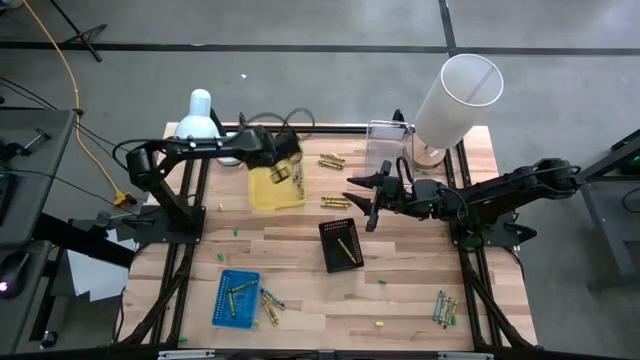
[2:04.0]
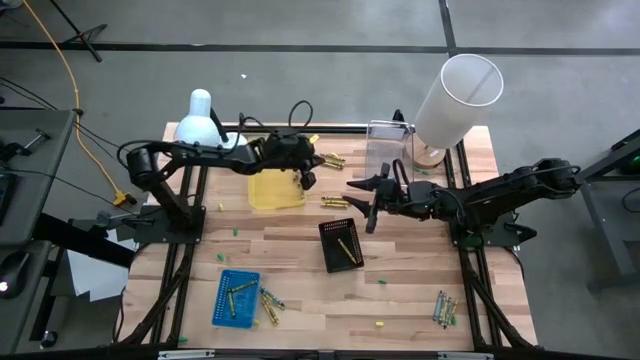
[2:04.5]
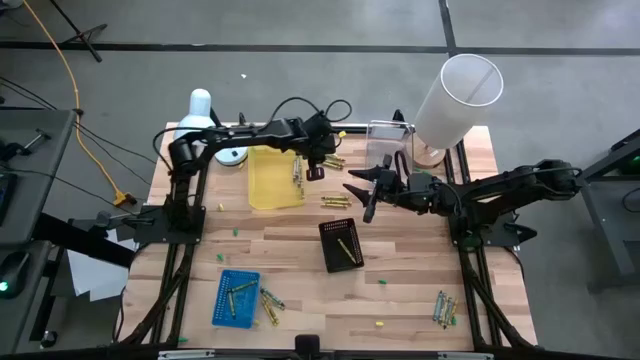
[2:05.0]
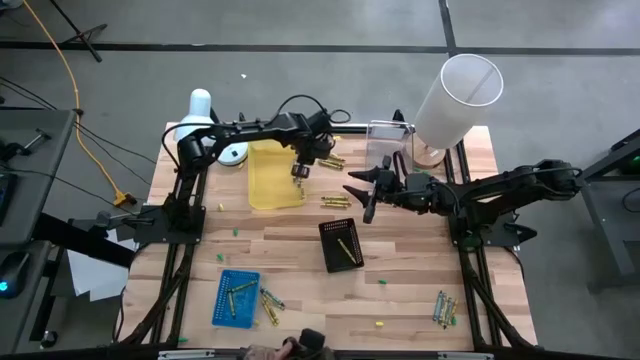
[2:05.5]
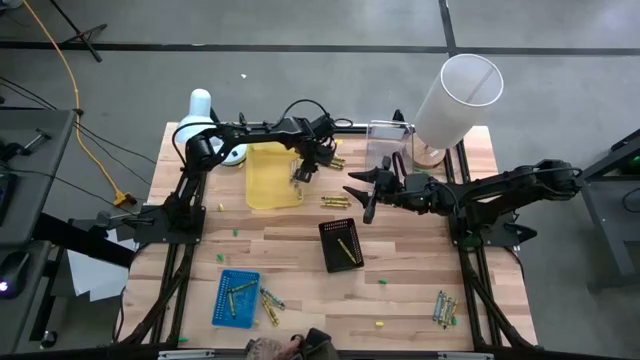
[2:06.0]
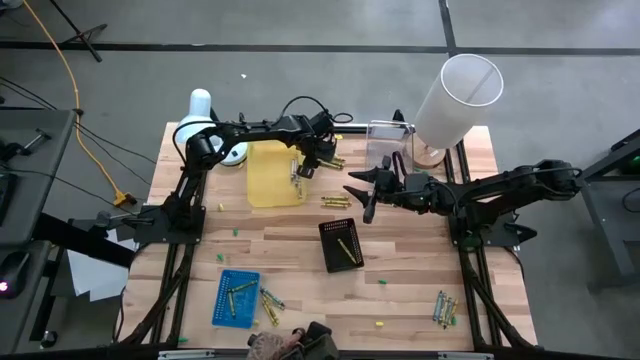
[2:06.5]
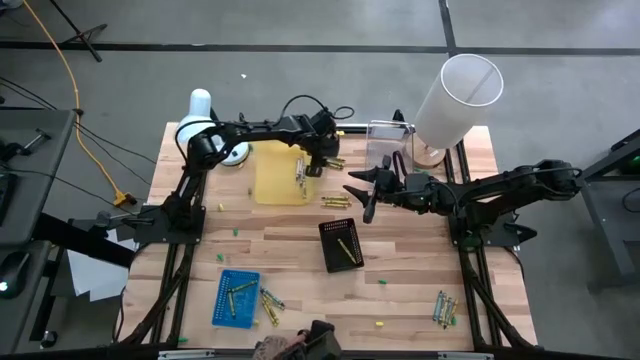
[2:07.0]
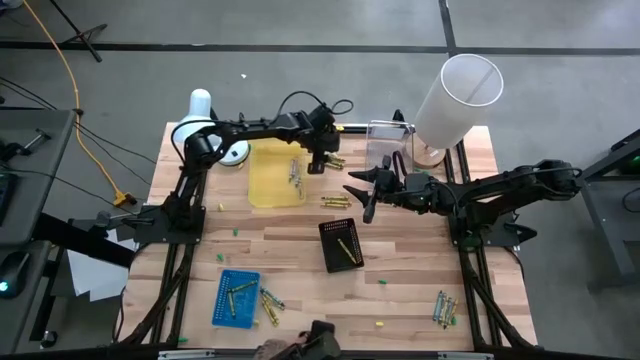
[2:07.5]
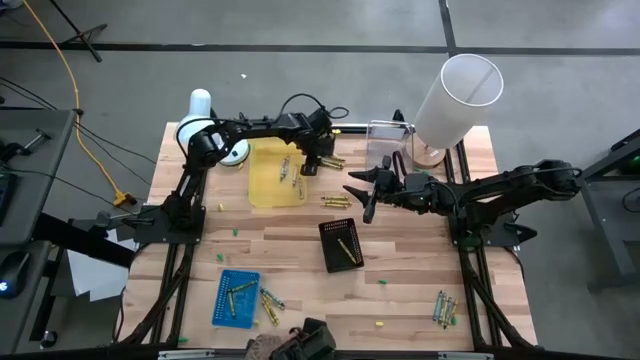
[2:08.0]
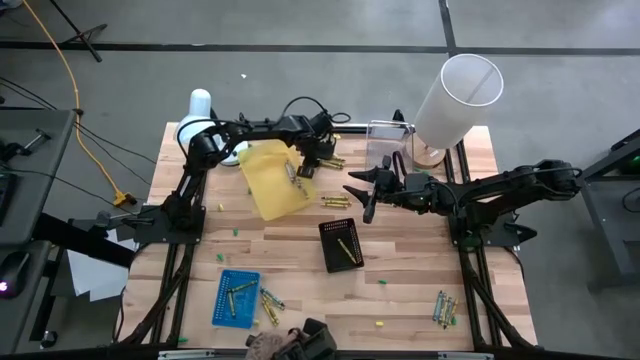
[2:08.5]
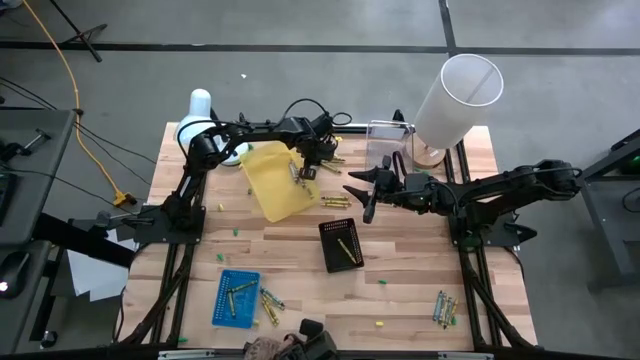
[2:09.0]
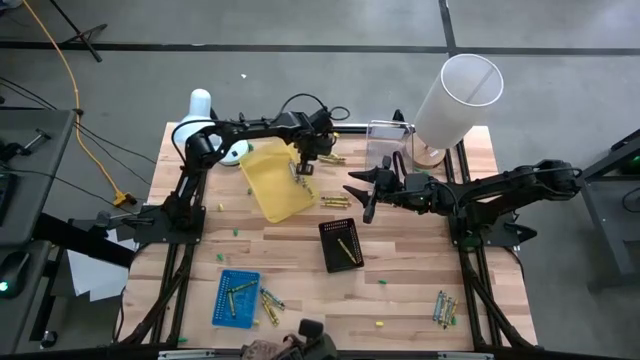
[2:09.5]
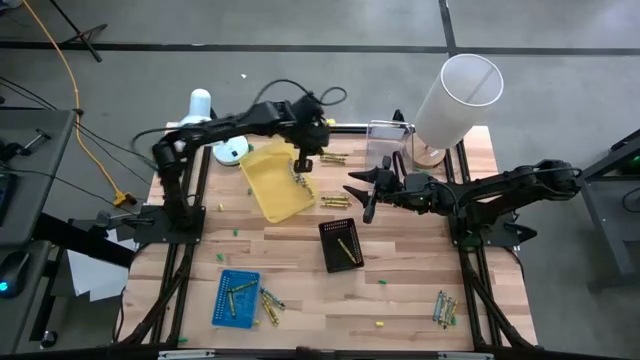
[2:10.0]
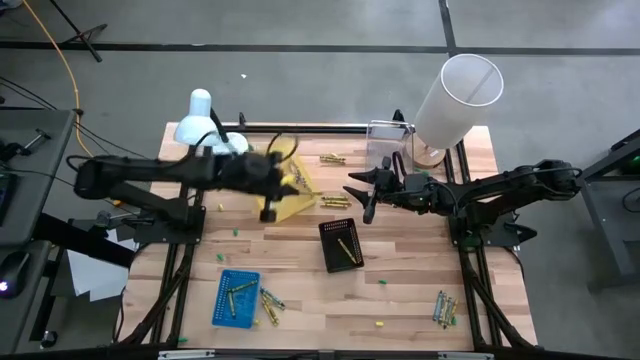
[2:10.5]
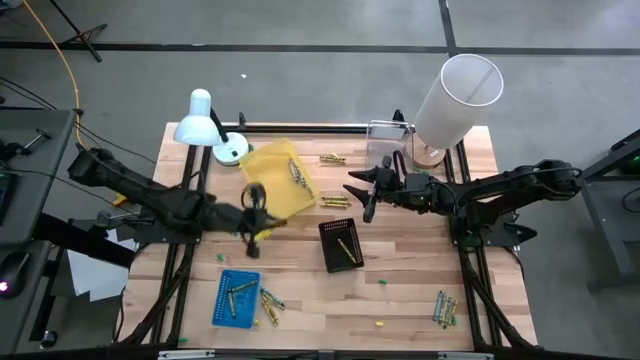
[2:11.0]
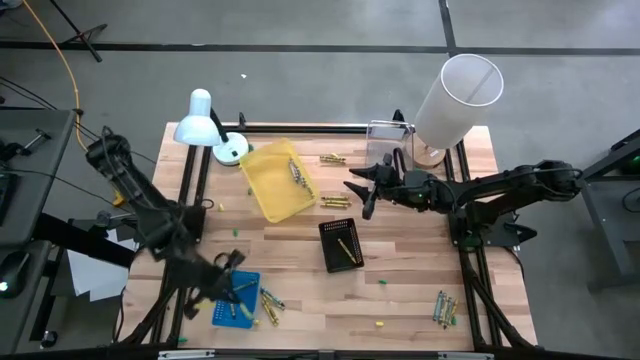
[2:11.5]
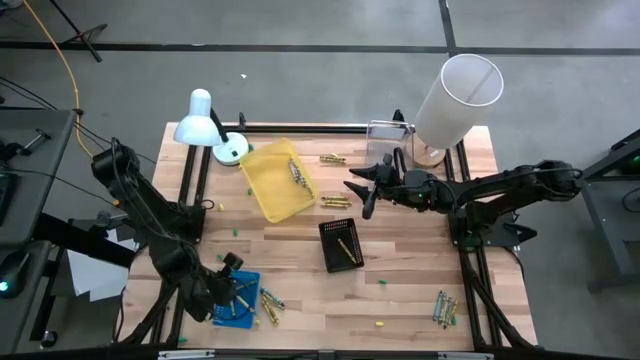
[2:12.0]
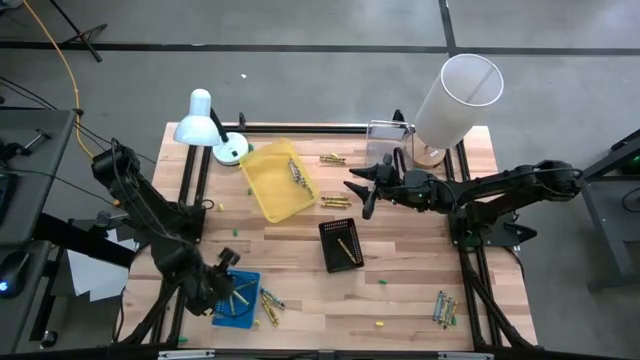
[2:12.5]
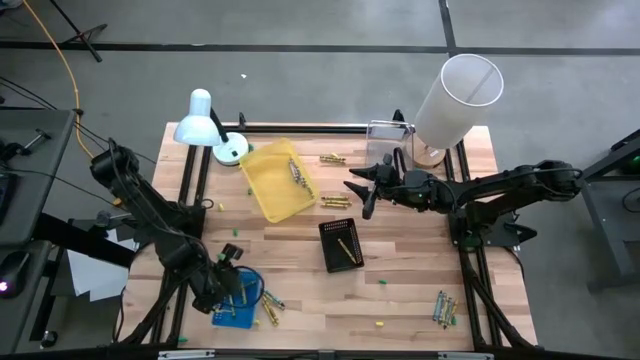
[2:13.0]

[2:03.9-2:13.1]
Task: Sort crayons
Put the green crayon into the blue bin

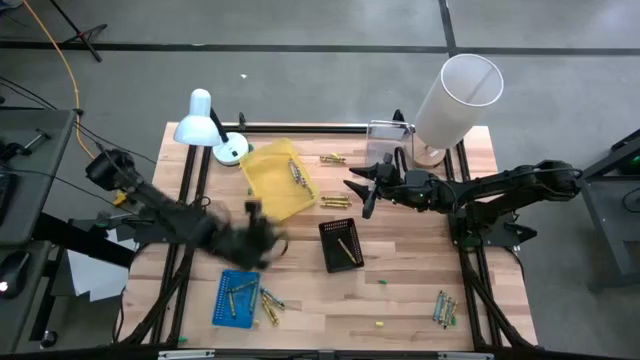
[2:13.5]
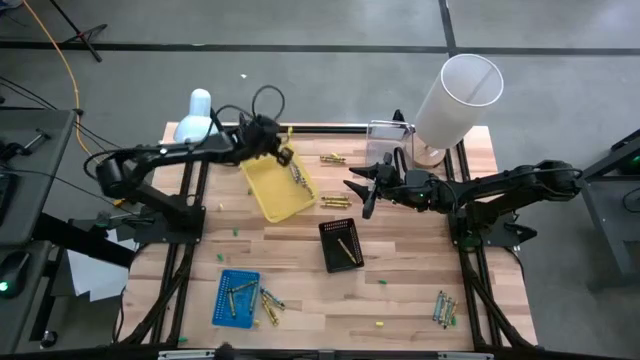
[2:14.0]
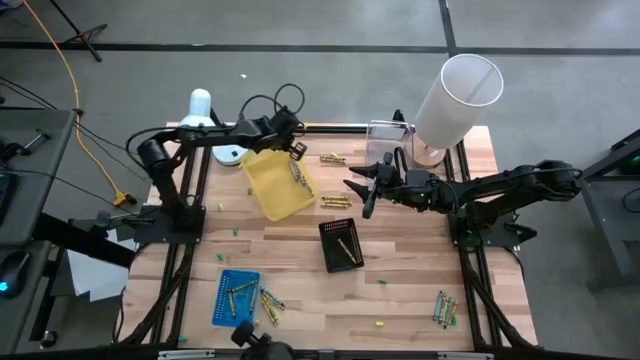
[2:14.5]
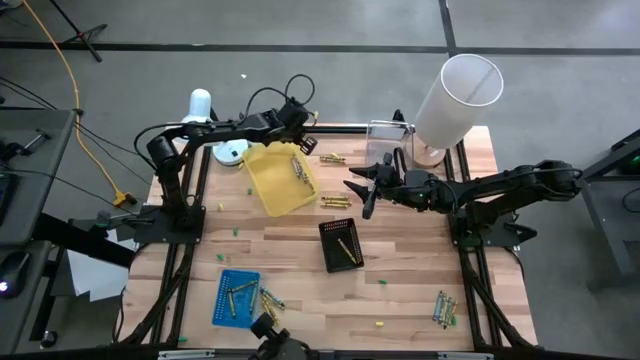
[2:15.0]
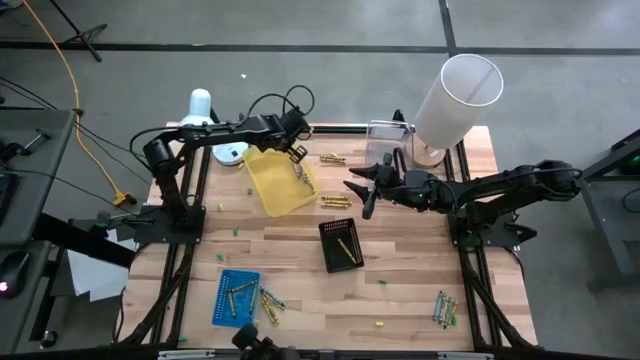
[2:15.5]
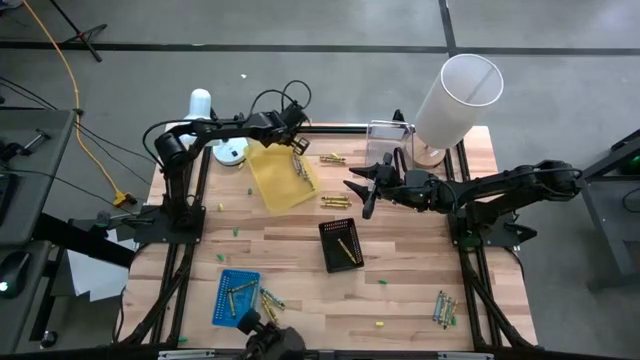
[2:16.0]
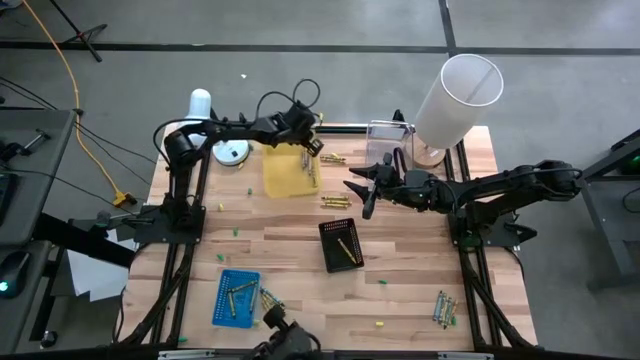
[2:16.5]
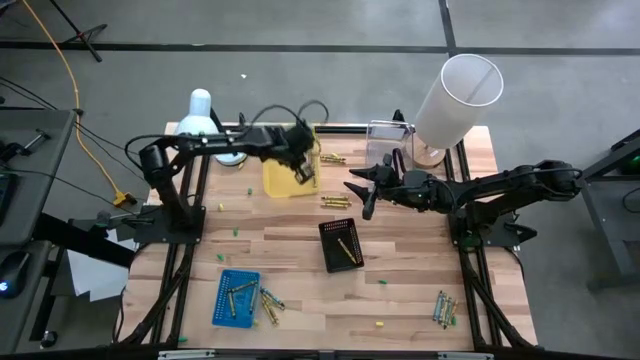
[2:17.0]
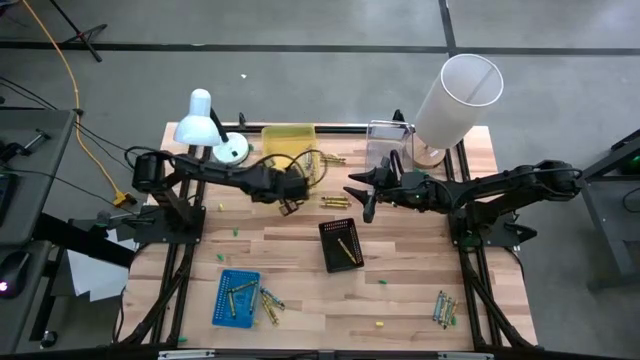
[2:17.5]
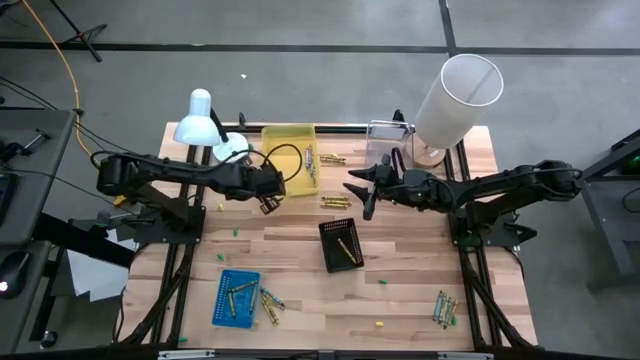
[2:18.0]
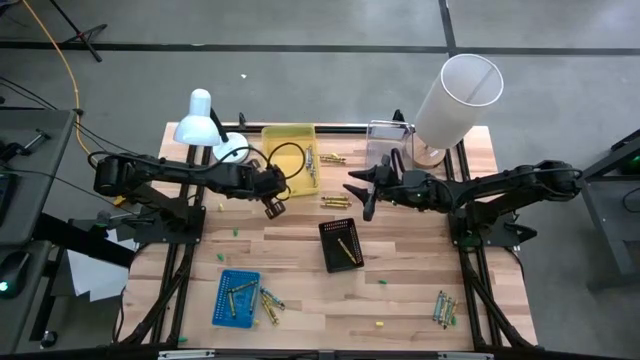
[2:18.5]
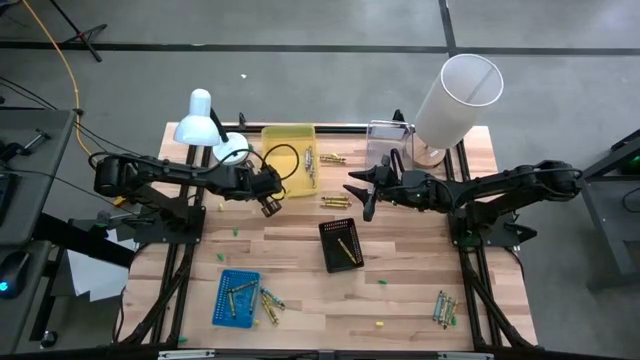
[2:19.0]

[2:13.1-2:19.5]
Adjust the yellow bin

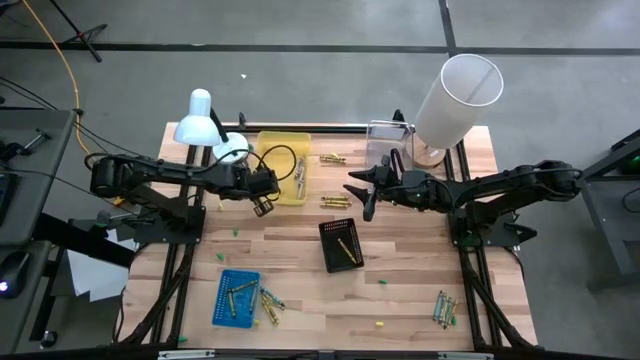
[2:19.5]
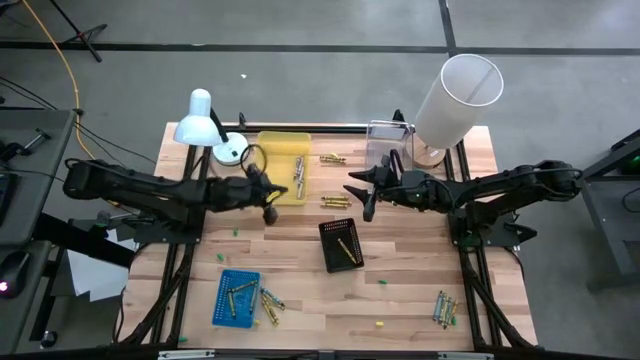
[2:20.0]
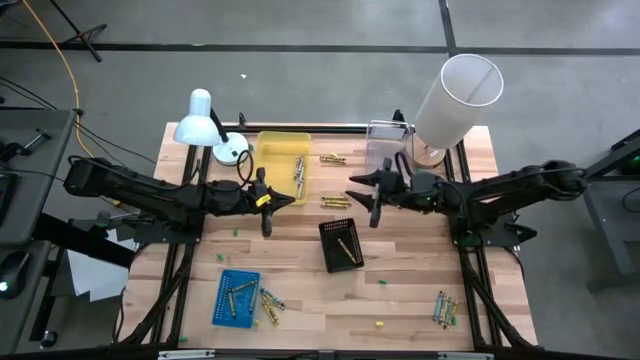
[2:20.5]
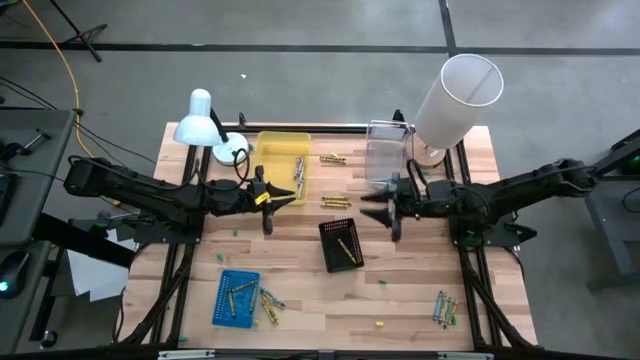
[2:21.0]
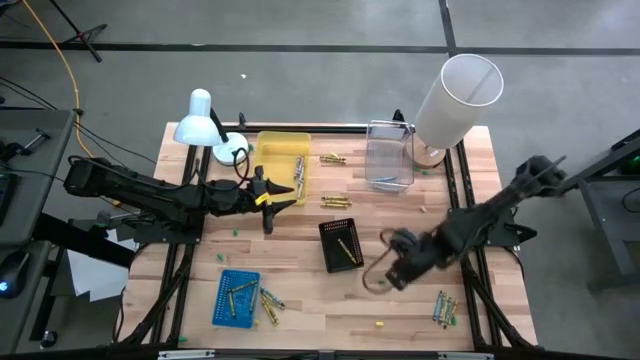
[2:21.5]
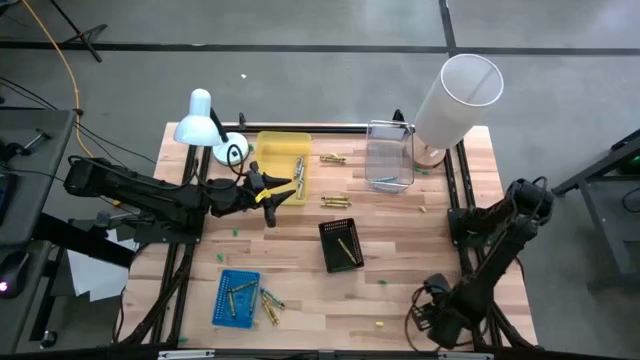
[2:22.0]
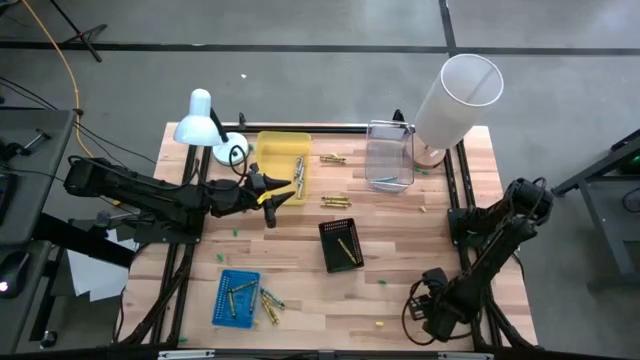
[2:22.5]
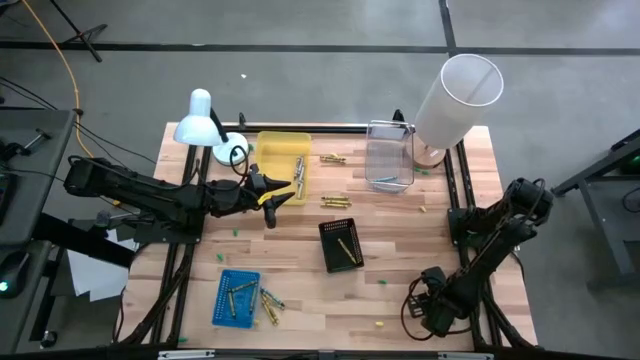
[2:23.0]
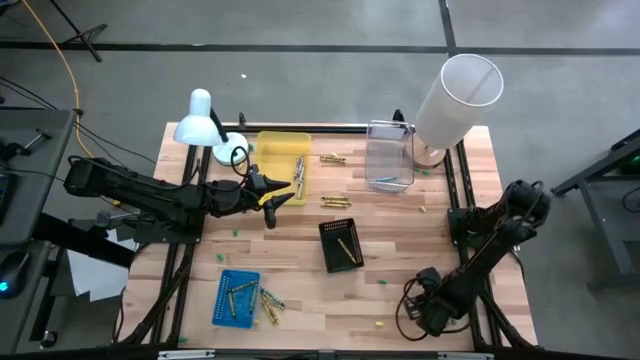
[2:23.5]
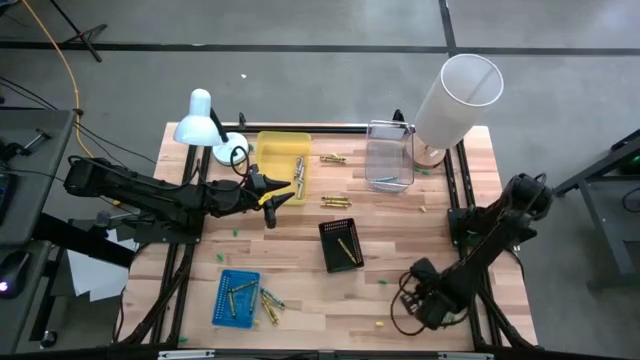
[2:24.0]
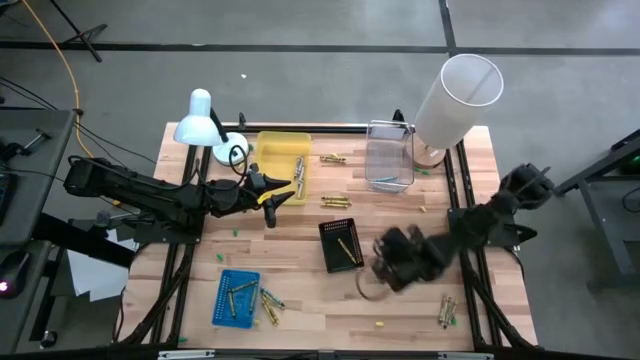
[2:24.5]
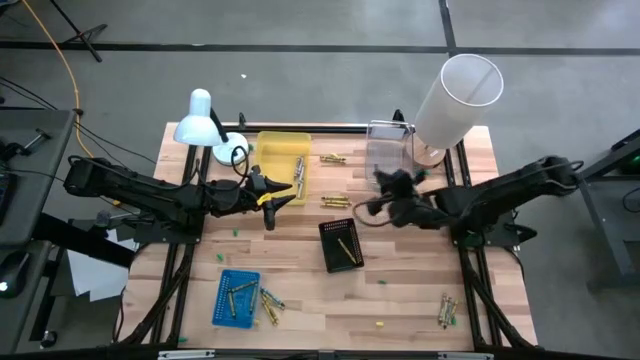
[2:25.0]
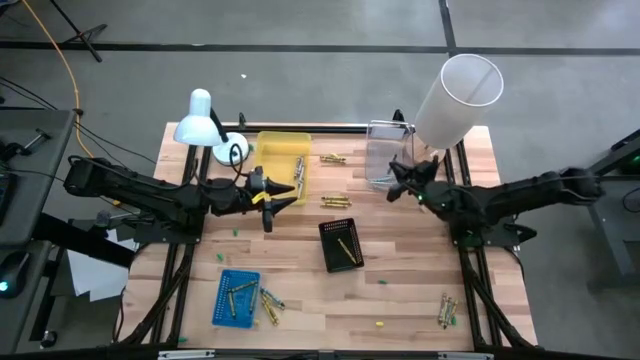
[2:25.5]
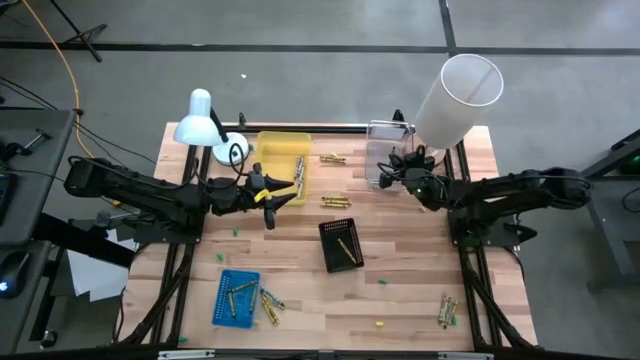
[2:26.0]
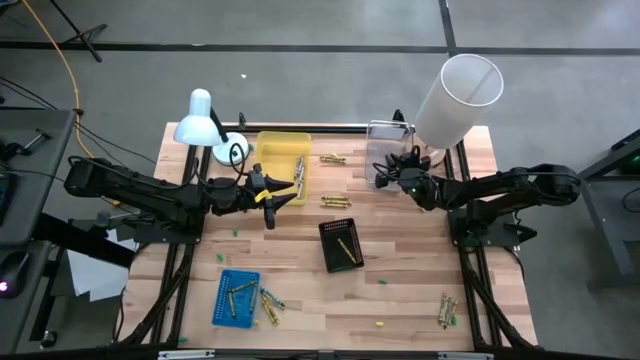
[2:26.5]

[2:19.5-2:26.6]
Put the blue crayon into the transparent bin
